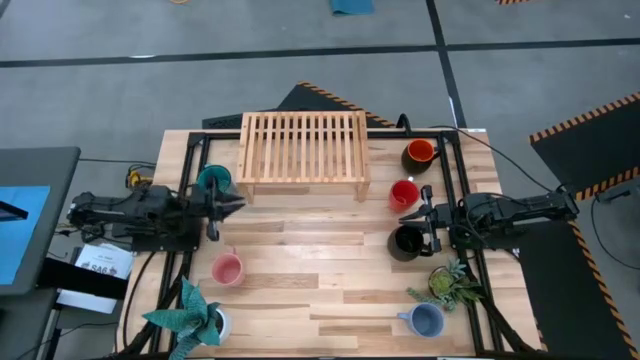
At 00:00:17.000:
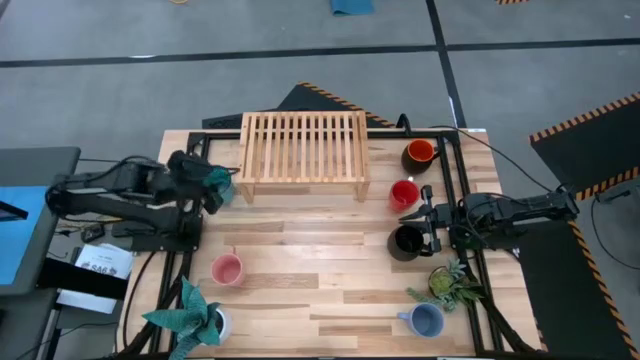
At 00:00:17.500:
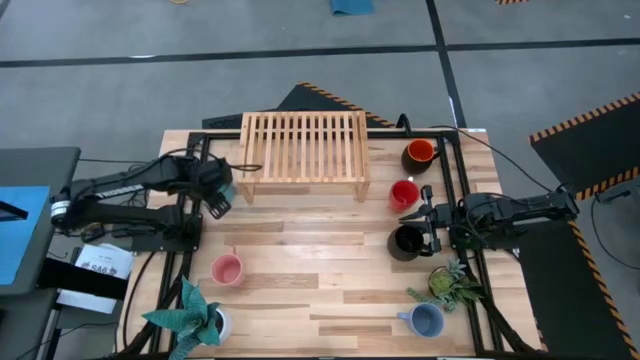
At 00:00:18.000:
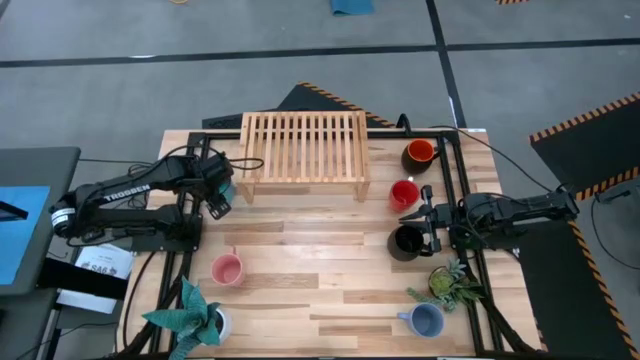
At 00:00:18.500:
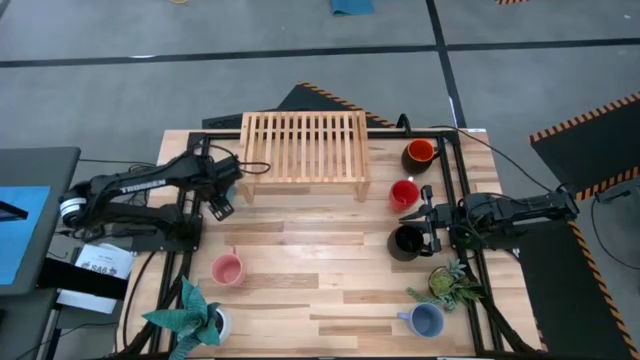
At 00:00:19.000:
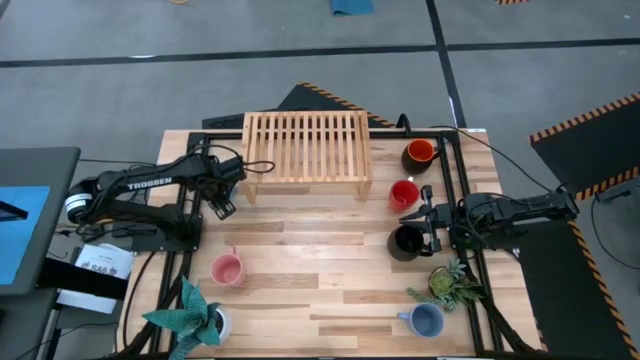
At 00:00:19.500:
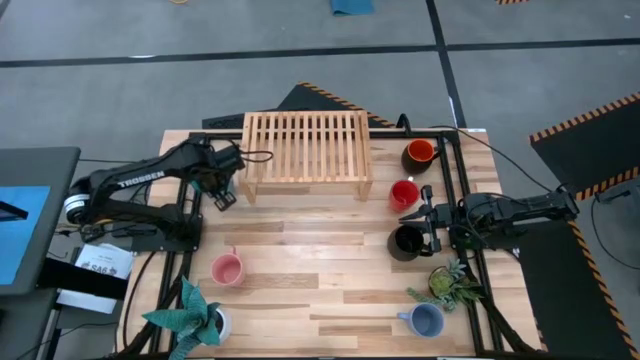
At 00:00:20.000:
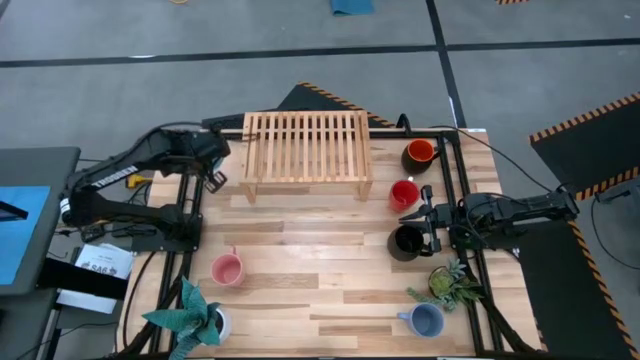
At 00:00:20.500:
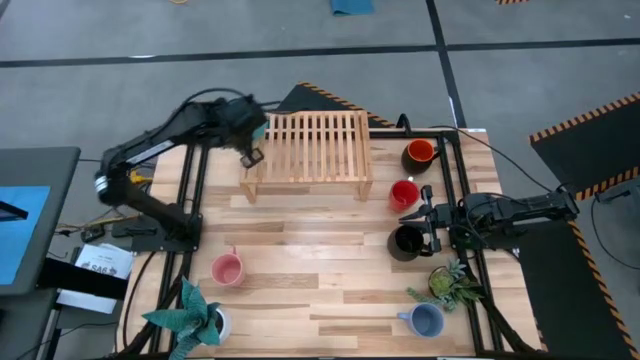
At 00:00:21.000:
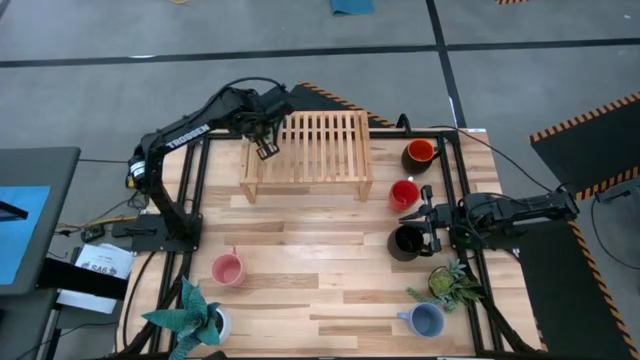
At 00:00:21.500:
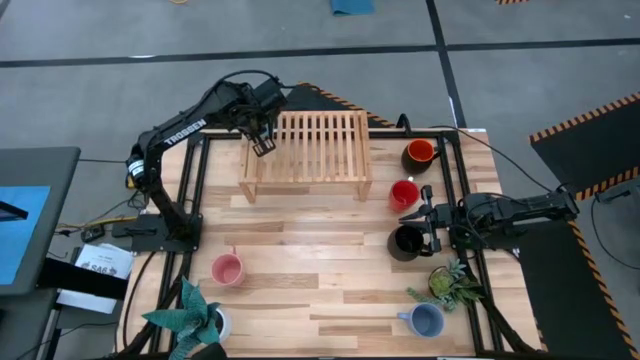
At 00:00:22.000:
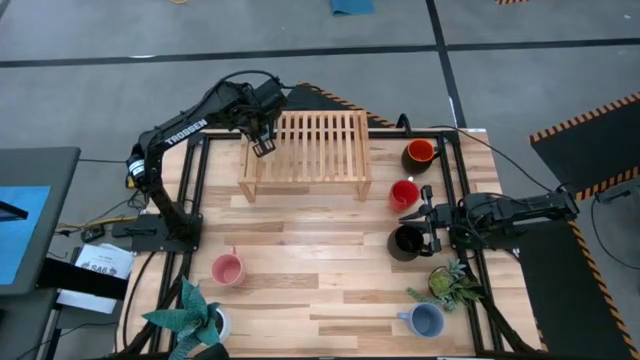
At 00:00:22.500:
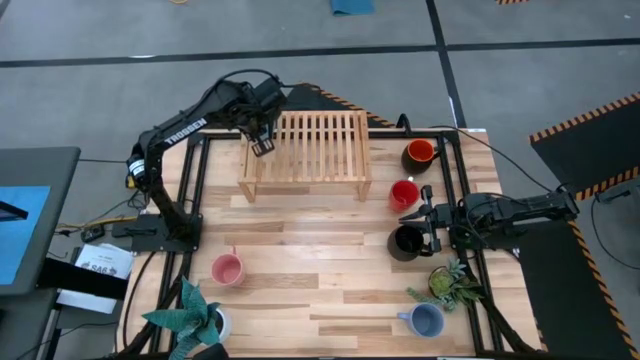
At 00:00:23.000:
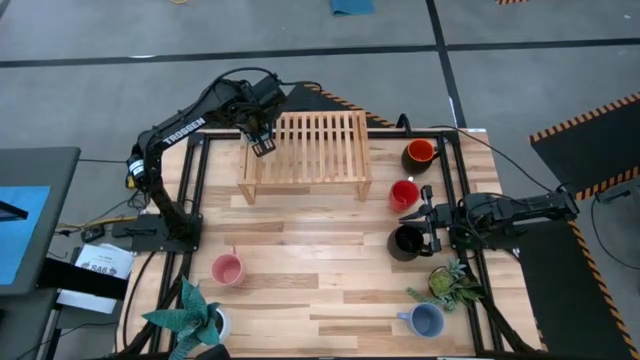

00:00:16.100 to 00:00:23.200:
Task: Place coffee mugs
Put the blue cup on the shelf

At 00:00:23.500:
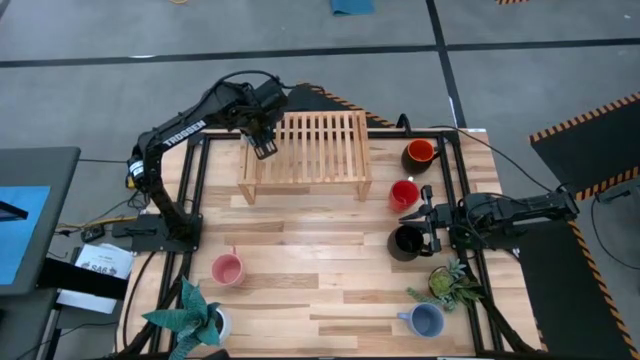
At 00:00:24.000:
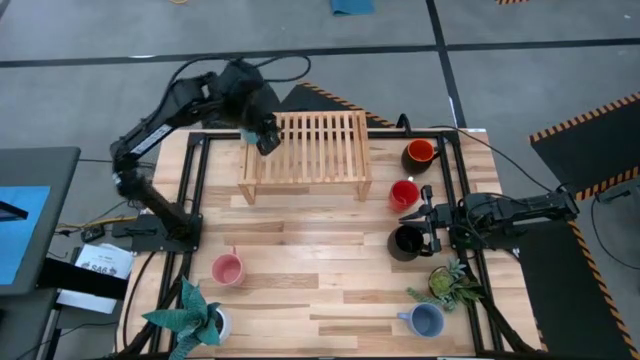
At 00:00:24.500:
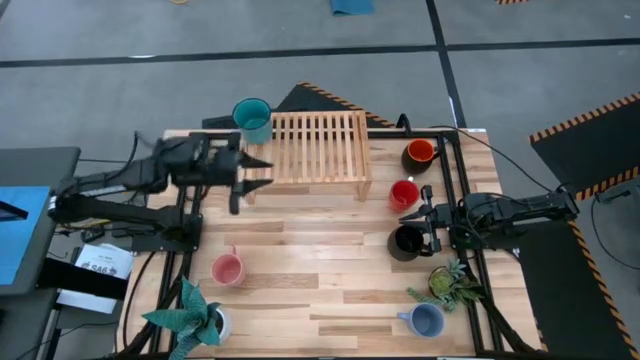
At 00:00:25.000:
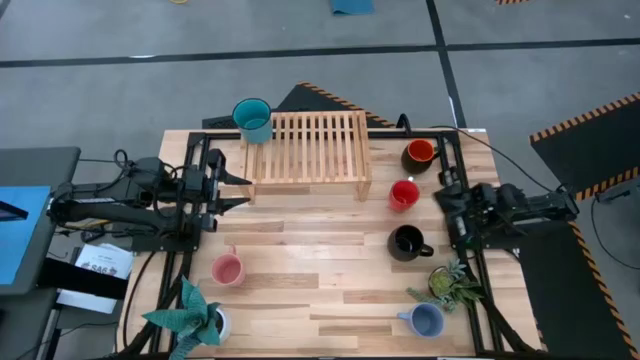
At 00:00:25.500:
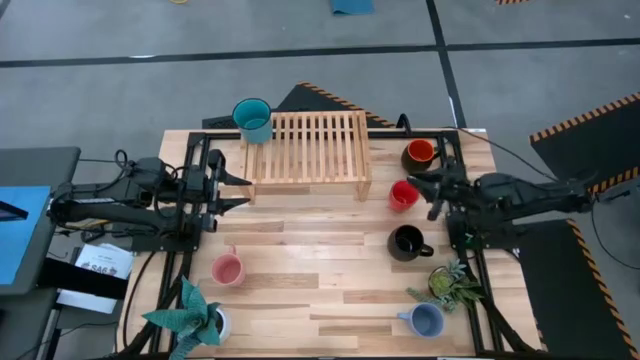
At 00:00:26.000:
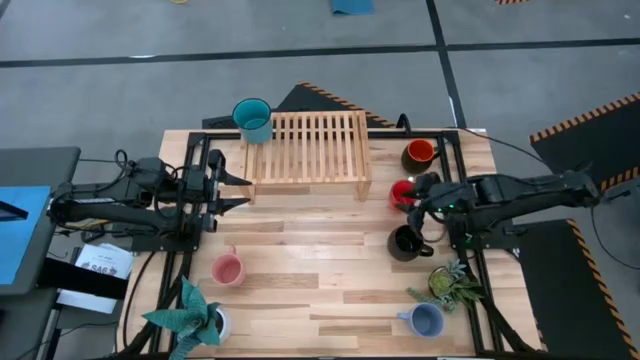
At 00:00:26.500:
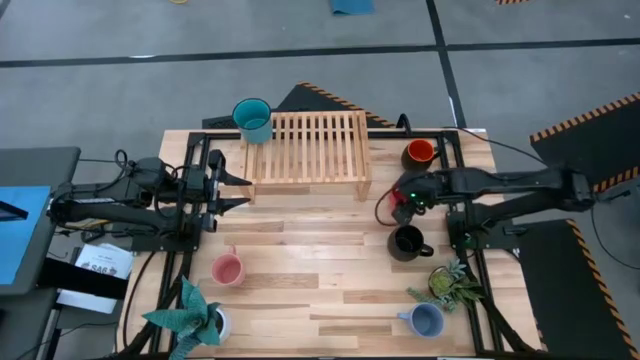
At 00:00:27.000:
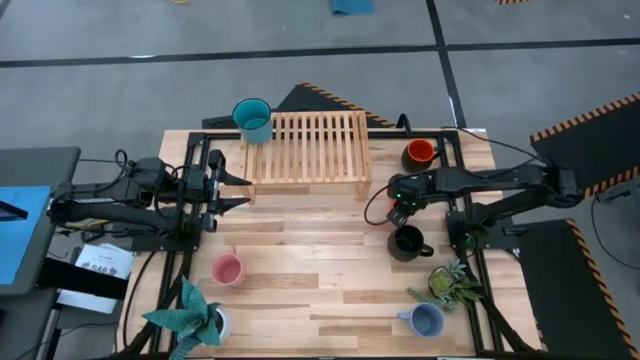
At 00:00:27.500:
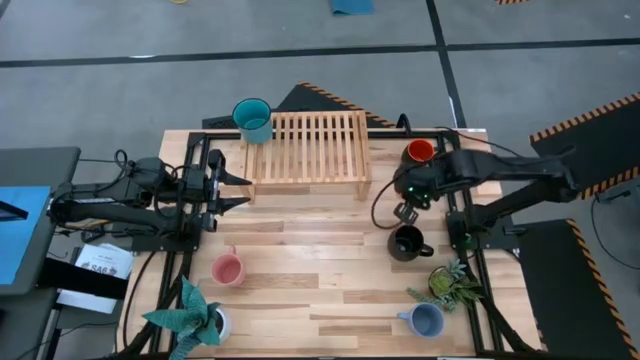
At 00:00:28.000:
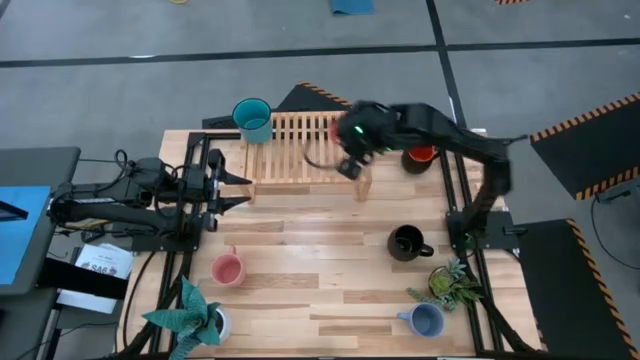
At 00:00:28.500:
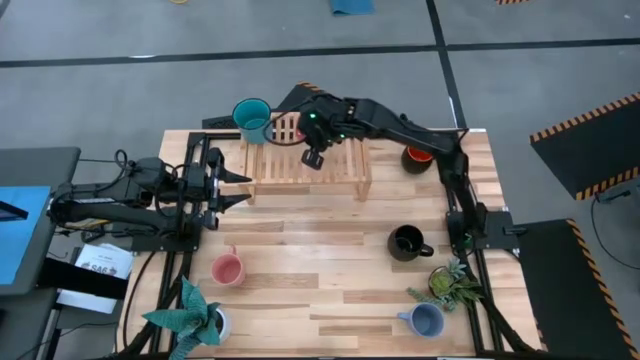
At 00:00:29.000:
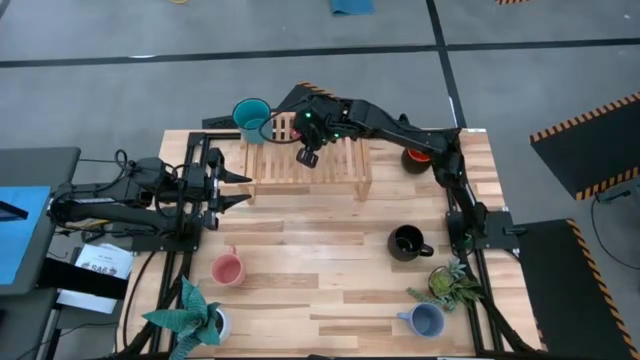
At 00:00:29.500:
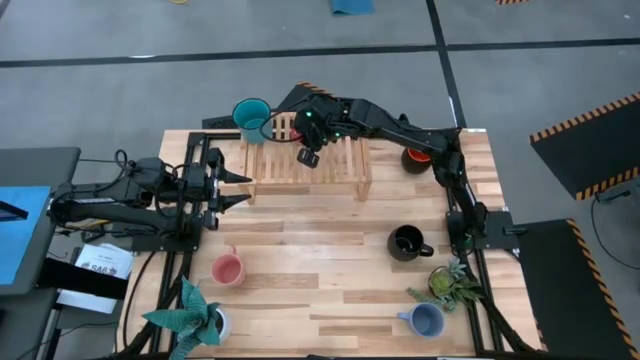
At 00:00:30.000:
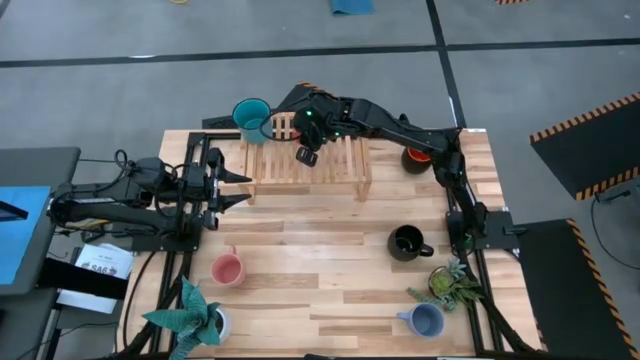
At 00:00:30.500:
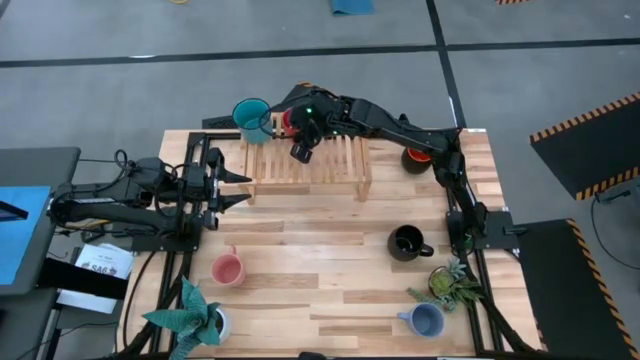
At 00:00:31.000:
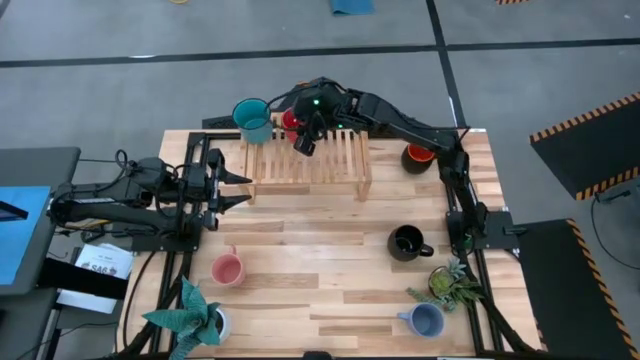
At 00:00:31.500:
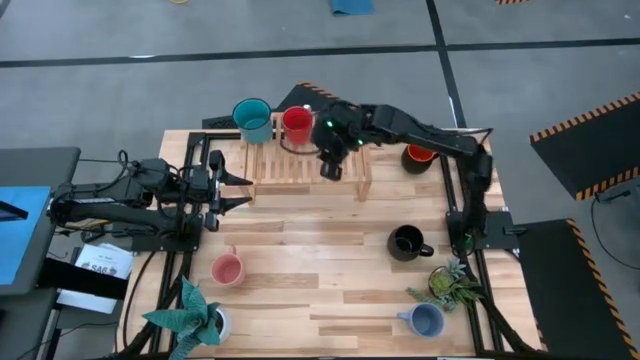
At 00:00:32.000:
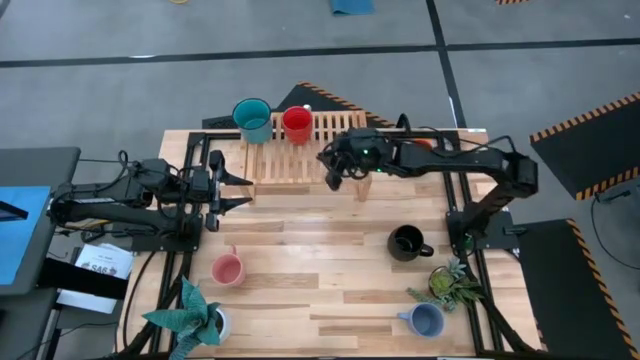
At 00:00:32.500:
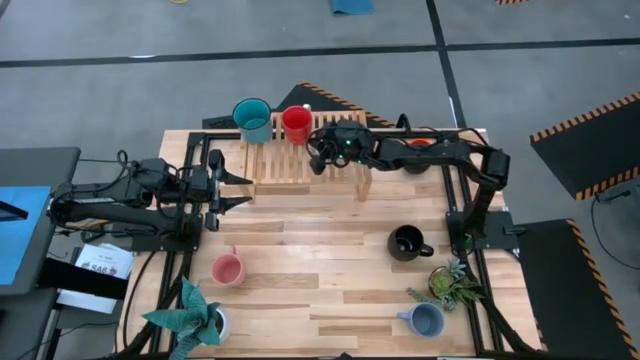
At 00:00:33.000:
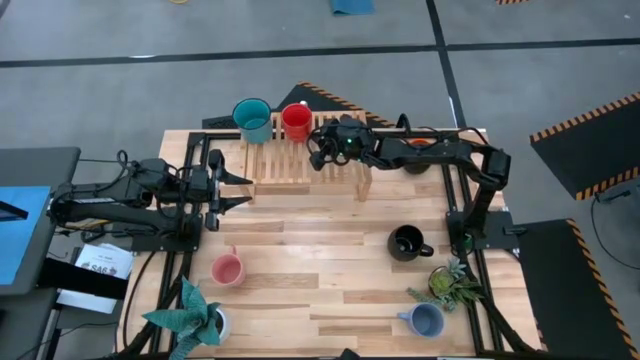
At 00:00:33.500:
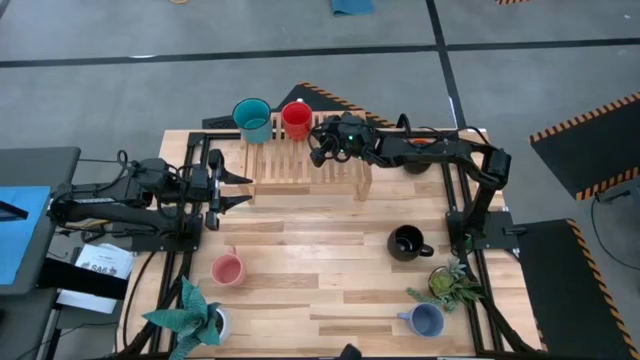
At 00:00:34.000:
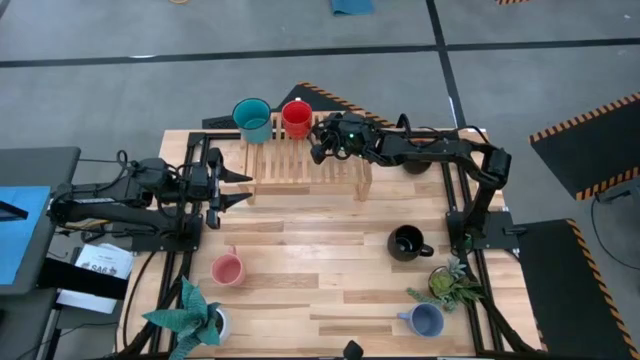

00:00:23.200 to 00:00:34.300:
Put the red cup on the shelf

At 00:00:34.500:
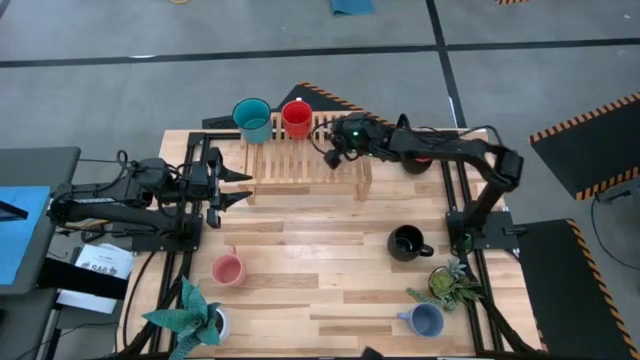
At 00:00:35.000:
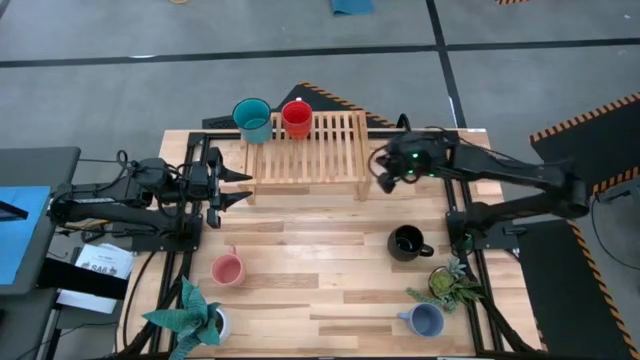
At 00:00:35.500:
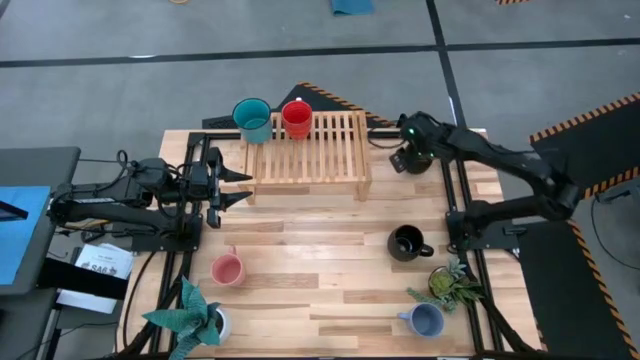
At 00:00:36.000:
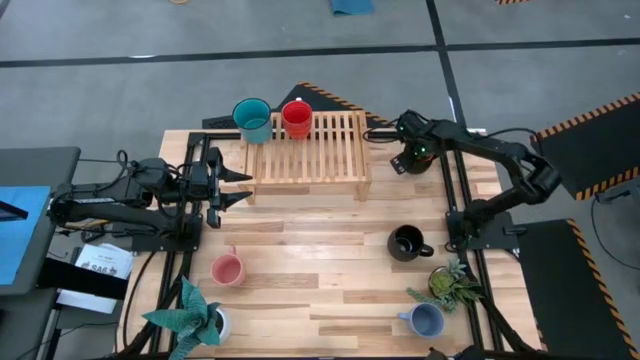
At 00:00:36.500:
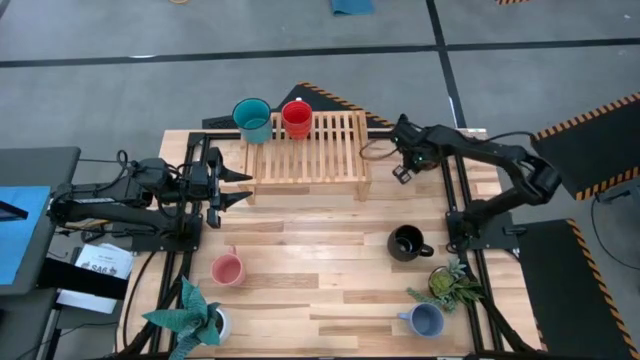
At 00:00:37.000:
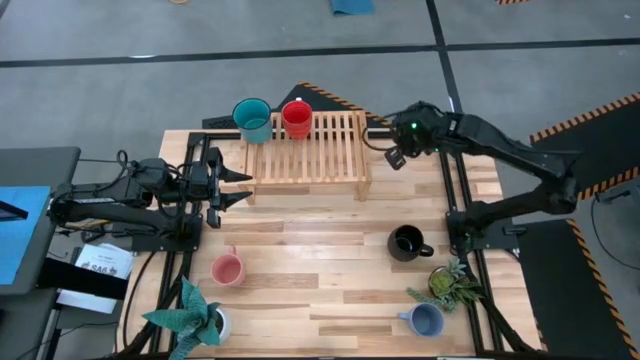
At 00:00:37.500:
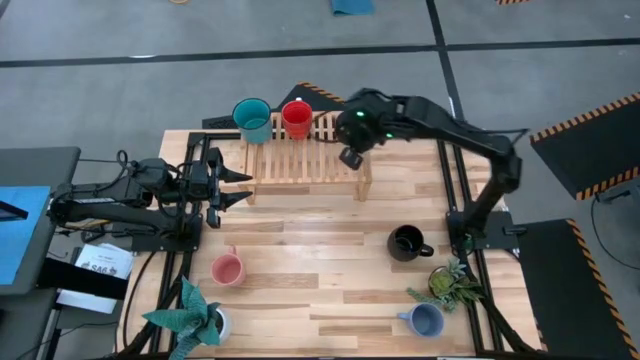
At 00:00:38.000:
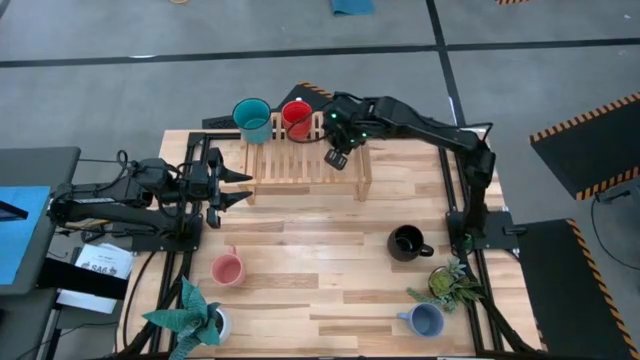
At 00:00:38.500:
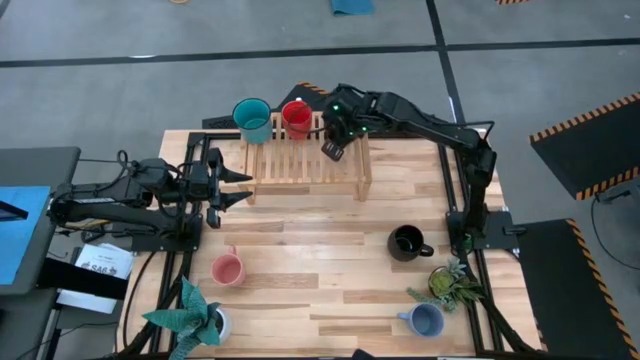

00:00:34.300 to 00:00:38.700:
Put the black and orange cup on the shelf
